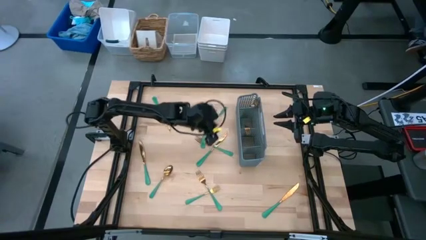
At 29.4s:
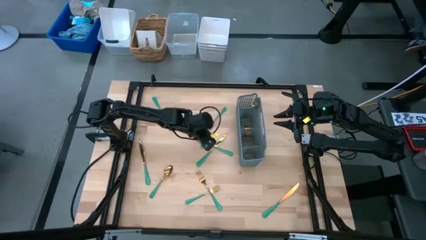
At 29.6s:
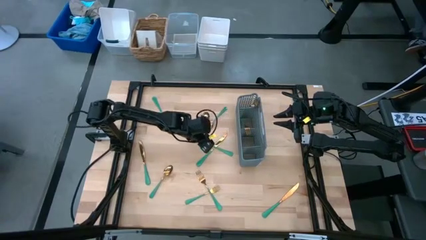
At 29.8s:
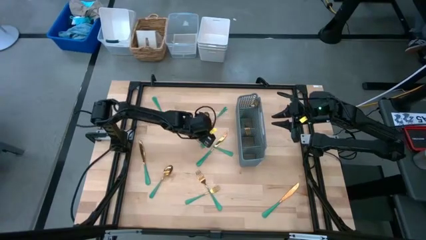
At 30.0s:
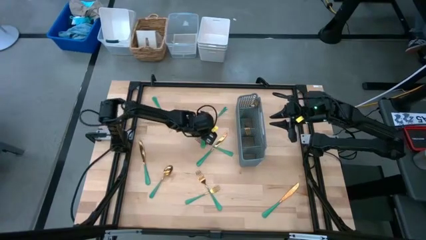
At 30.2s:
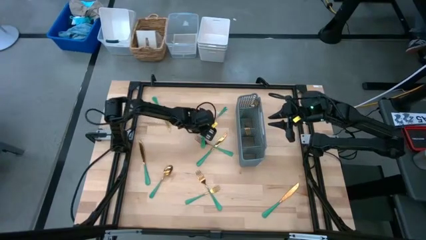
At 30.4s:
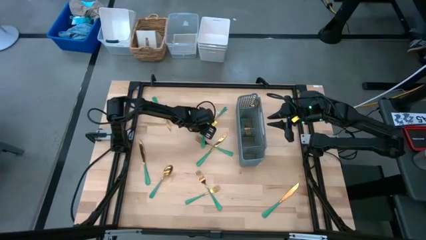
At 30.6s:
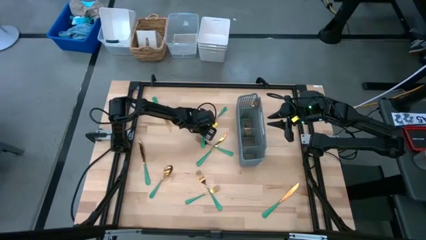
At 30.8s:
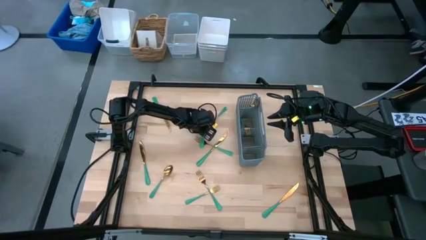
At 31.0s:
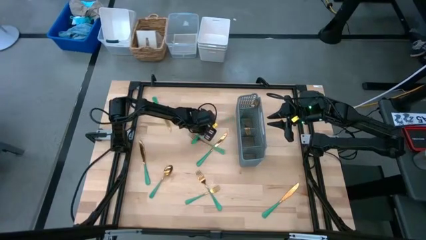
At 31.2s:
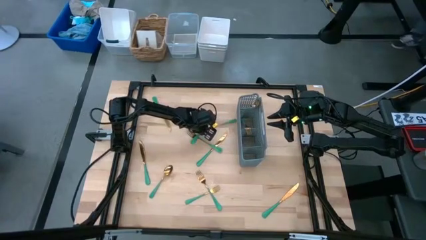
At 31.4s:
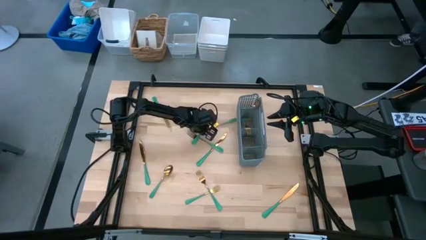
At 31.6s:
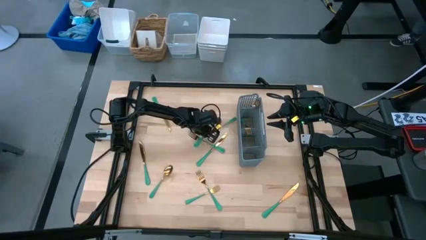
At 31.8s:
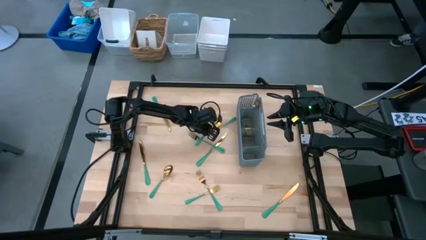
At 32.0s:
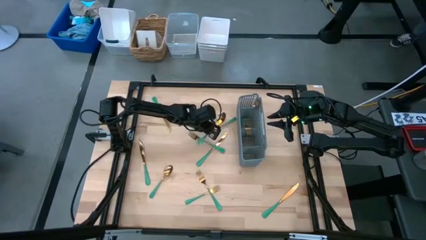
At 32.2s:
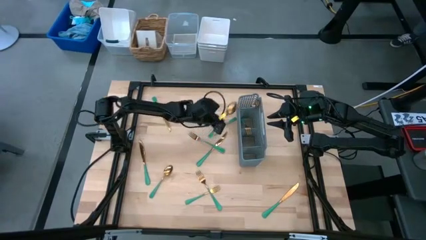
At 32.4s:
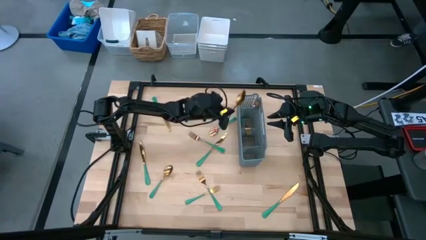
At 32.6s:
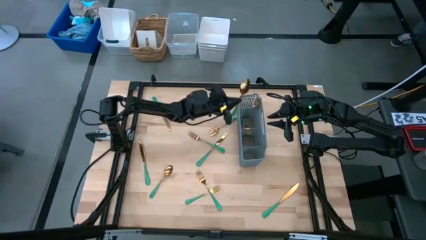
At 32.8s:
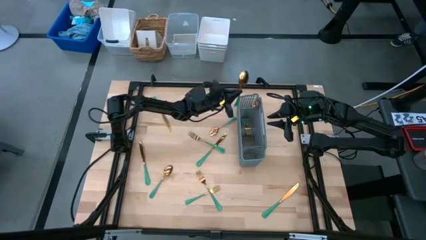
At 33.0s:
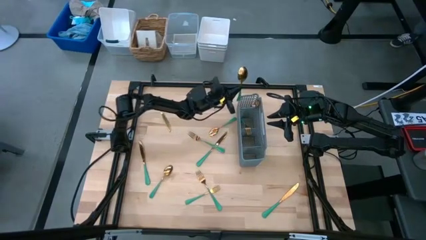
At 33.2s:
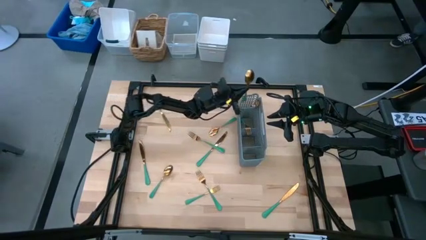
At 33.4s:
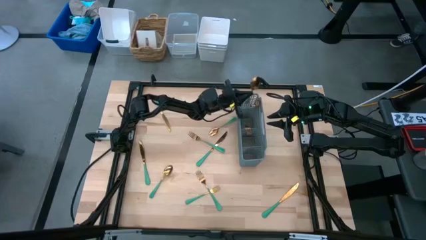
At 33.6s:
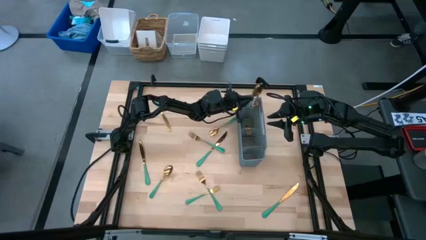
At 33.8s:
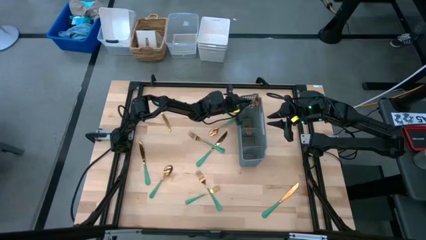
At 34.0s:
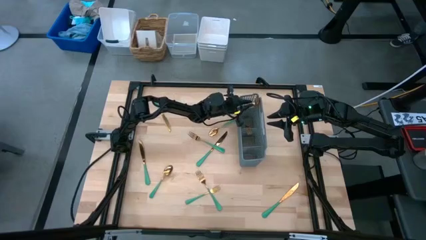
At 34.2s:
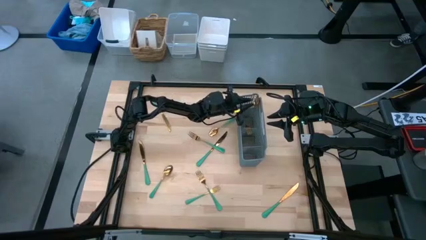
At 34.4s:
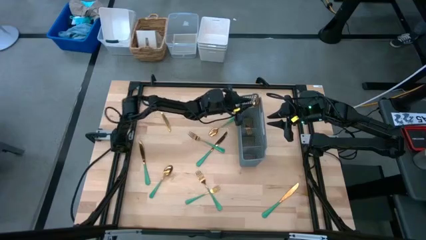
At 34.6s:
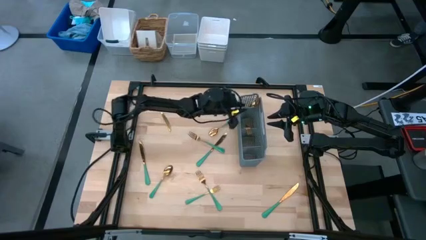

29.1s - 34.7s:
Task: Sort silverware
Put the middle spoon into the the top section of the basket

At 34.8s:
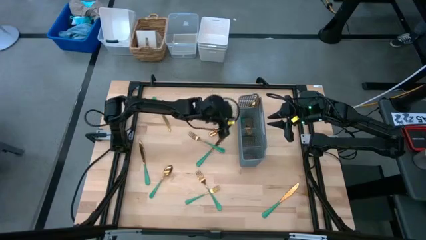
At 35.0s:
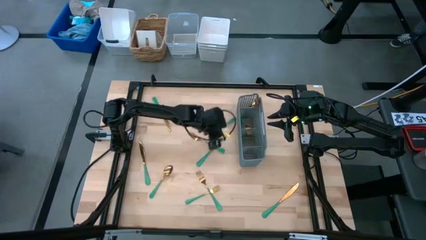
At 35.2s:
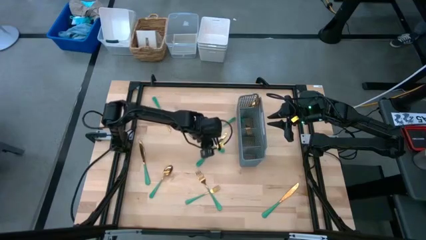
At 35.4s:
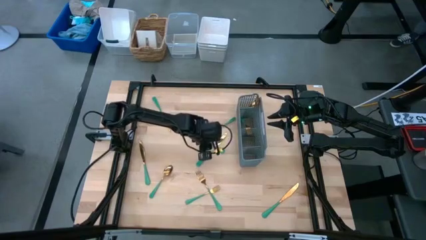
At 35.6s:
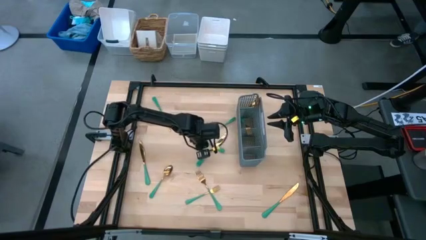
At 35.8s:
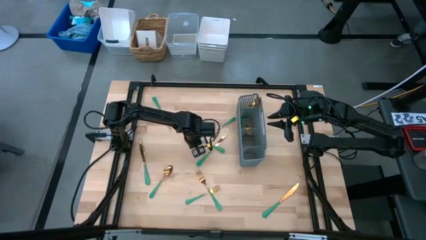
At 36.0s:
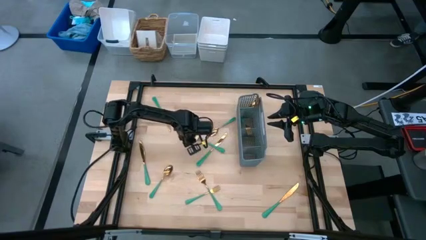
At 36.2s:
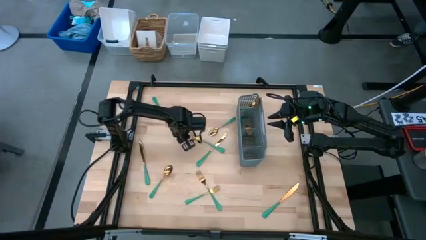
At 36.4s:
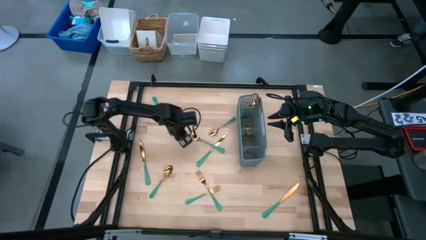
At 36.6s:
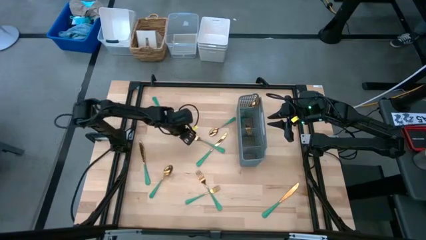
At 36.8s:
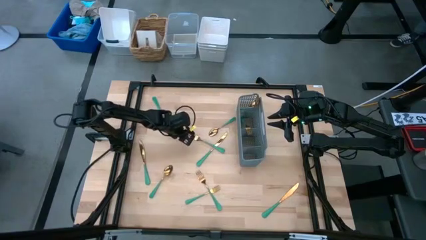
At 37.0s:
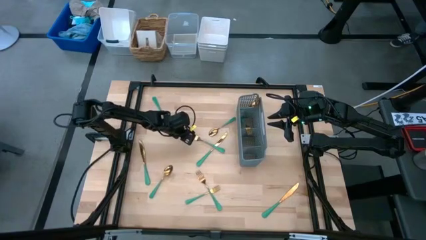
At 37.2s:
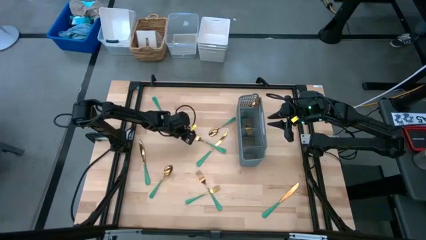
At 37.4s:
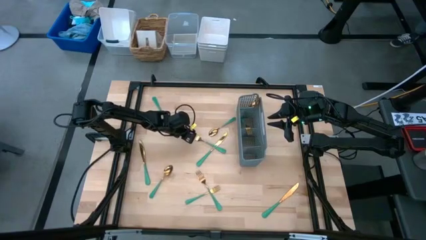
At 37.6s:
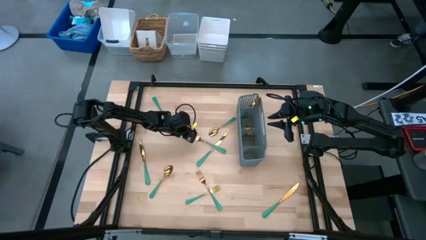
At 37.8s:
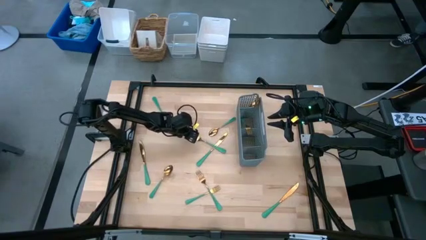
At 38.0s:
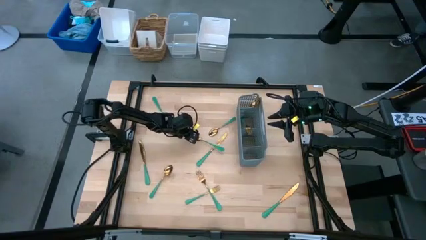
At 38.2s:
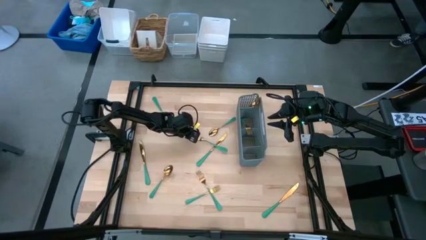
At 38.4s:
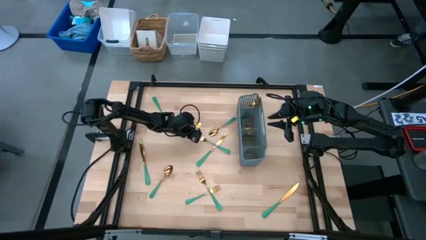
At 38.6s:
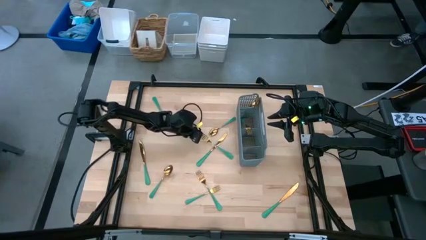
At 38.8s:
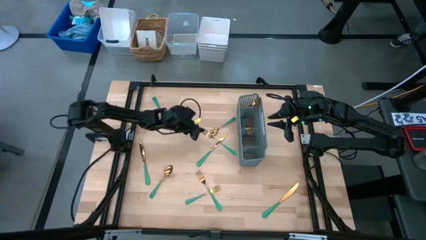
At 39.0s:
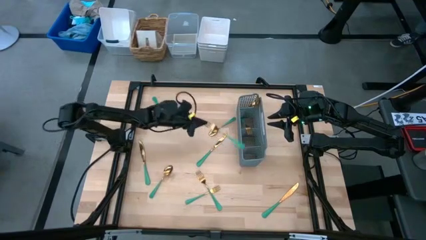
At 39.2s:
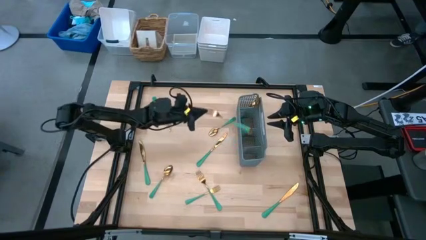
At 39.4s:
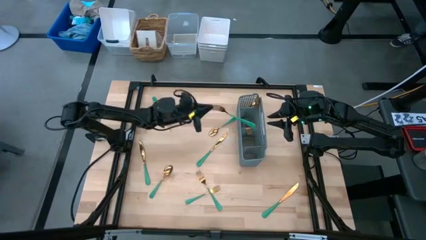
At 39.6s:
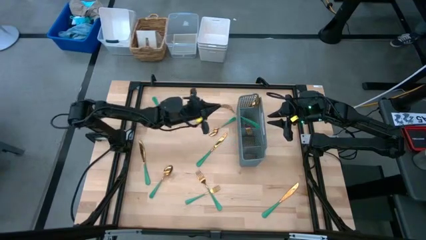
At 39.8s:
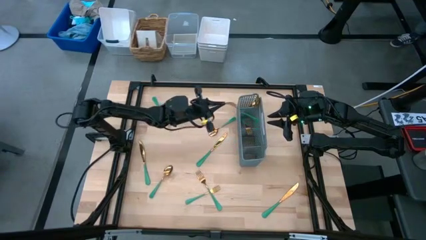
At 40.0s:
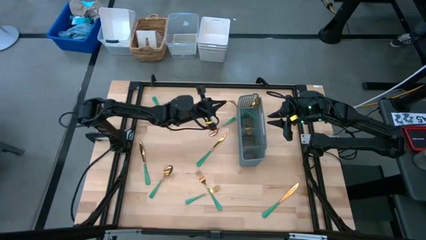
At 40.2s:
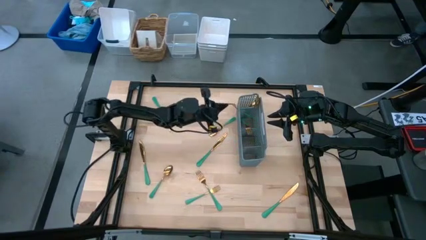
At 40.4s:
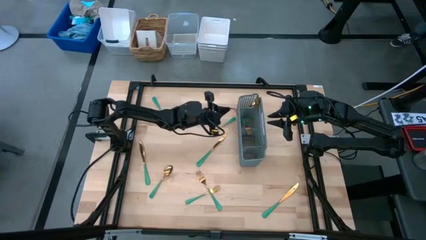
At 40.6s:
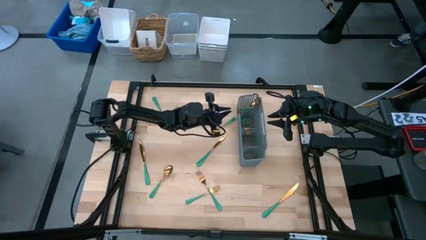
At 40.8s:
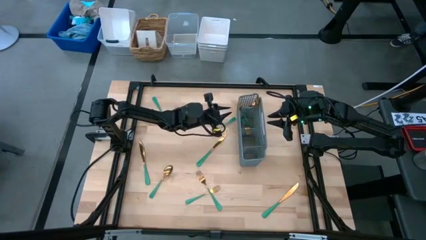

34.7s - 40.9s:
Put the top fork in the middle section of the basket

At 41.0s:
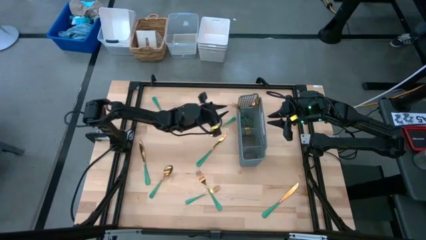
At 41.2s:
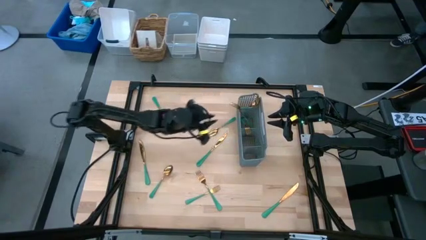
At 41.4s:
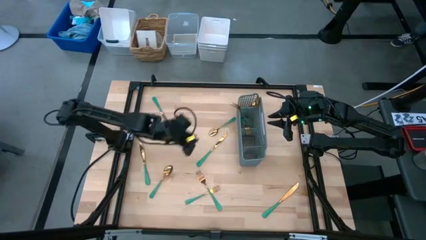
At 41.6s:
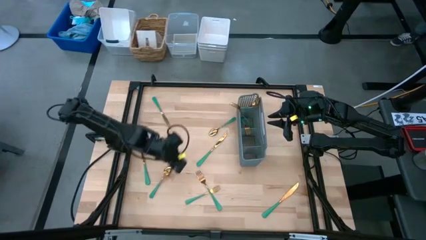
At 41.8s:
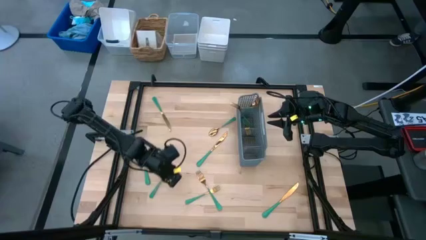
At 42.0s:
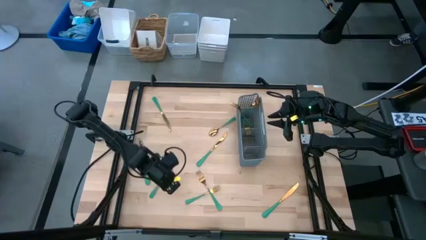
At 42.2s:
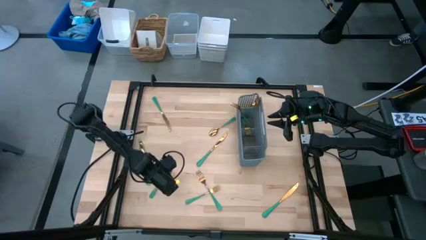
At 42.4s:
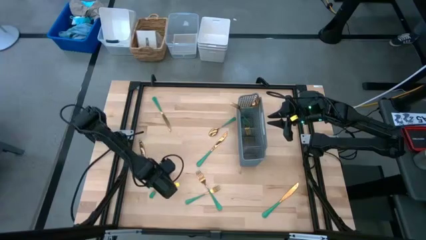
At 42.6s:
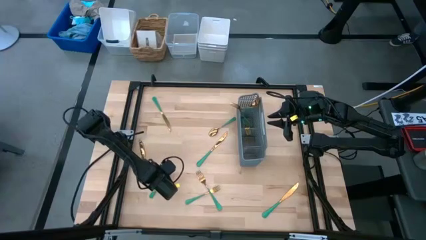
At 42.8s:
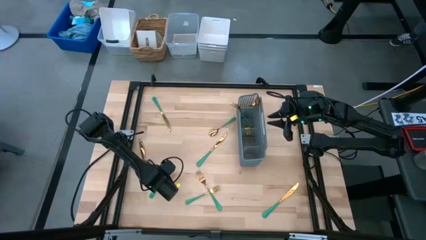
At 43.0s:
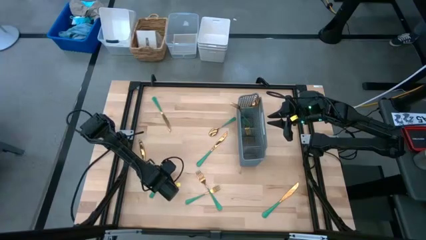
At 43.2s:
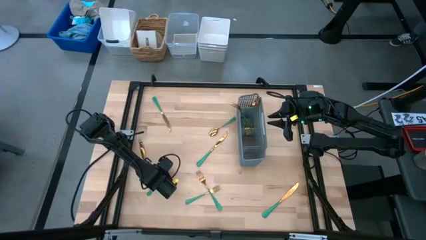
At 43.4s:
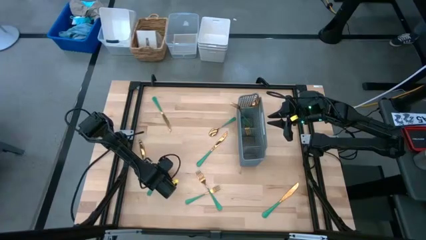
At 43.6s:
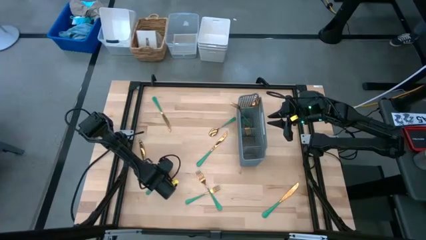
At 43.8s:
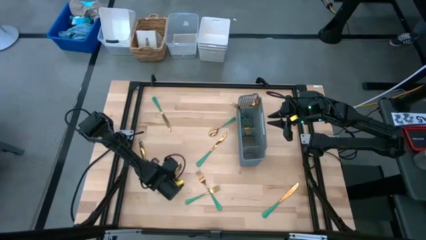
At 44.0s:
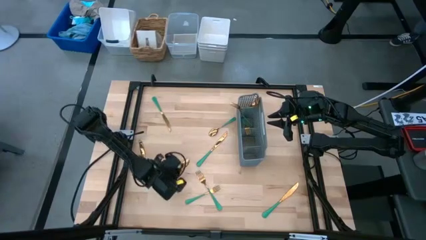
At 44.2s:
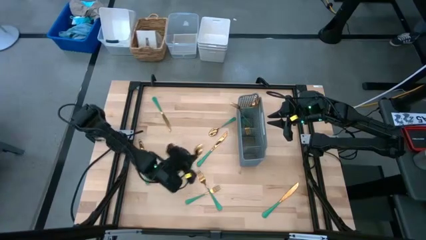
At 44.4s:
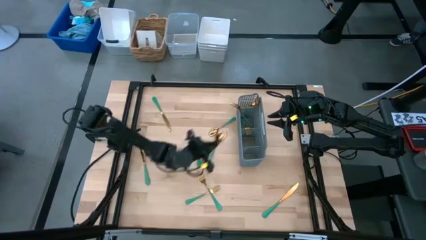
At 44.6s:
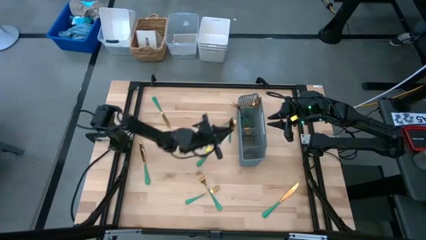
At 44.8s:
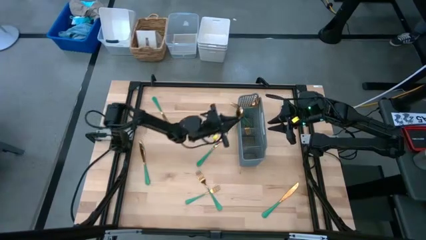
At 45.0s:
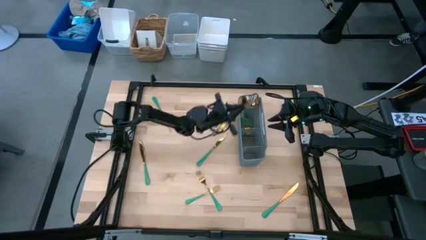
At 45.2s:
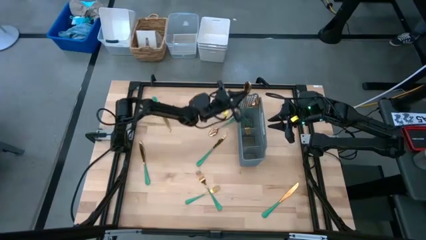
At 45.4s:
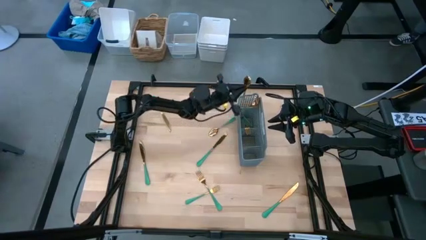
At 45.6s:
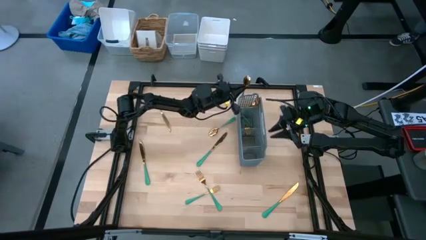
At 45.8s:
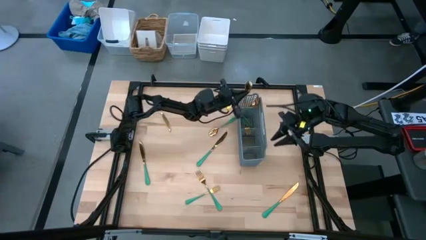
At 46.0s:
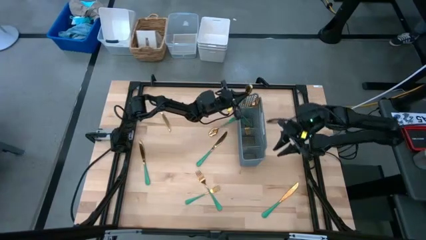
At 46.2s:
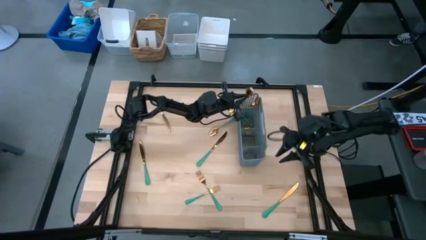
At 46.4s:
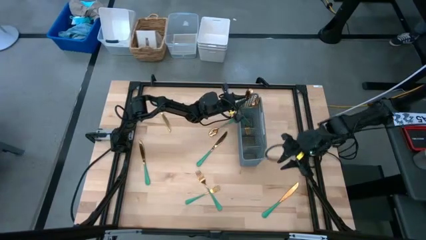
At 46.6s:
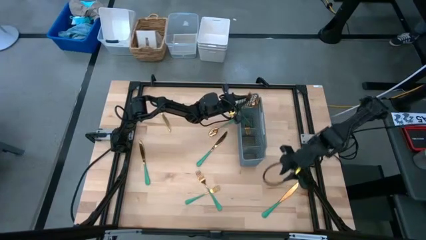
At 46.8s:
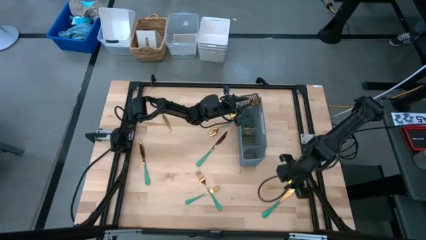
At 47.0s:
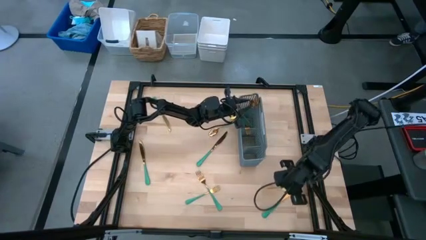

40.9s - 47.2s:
Put the bottom left spoon into the top section of the basket
